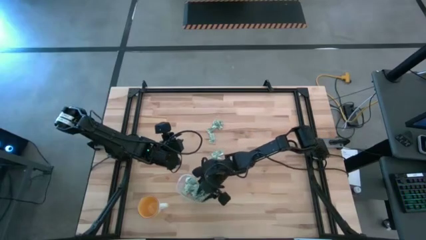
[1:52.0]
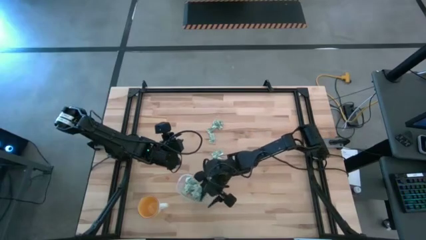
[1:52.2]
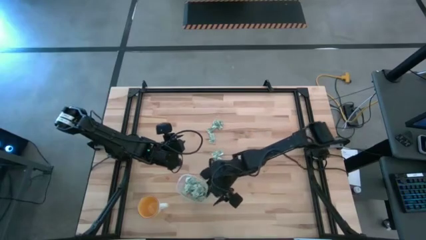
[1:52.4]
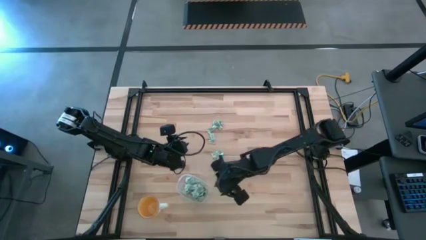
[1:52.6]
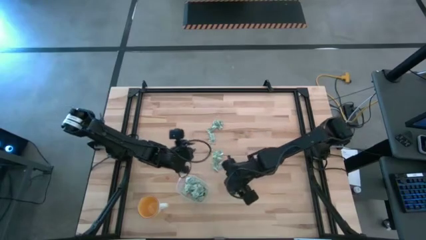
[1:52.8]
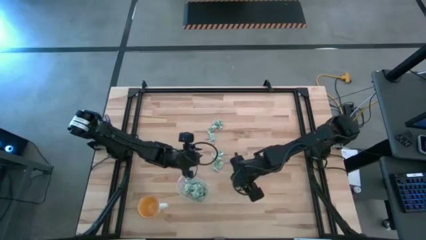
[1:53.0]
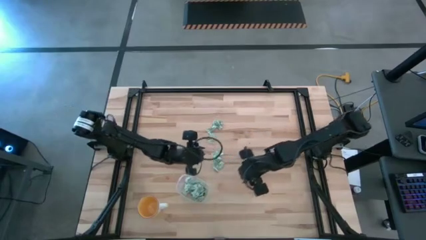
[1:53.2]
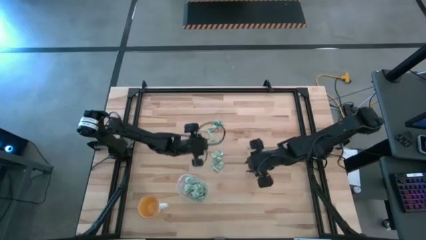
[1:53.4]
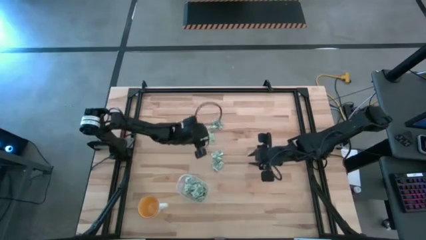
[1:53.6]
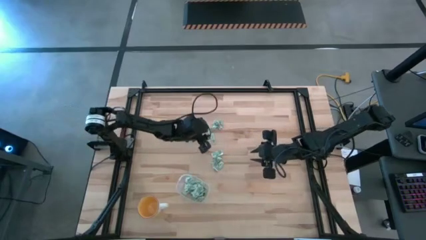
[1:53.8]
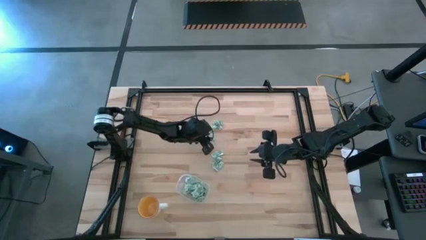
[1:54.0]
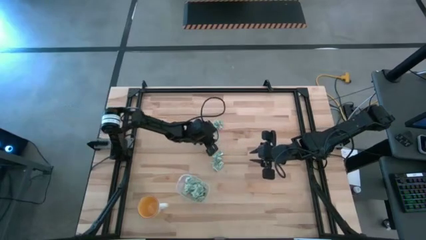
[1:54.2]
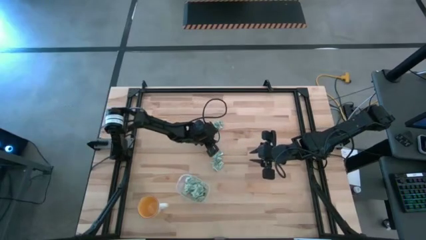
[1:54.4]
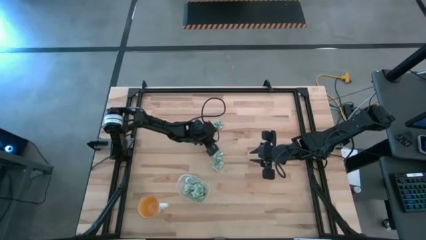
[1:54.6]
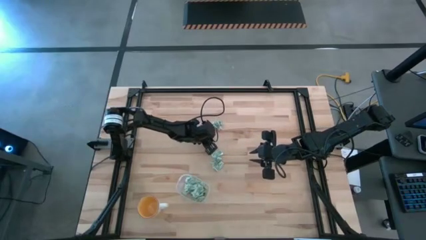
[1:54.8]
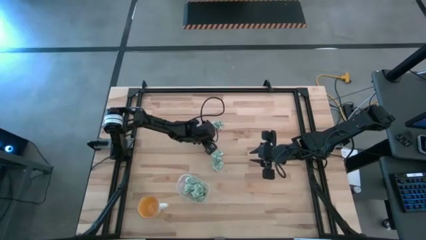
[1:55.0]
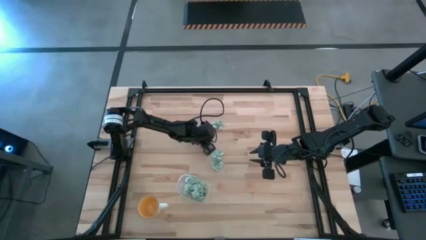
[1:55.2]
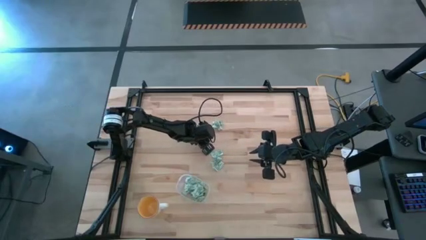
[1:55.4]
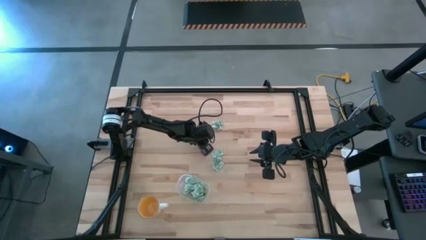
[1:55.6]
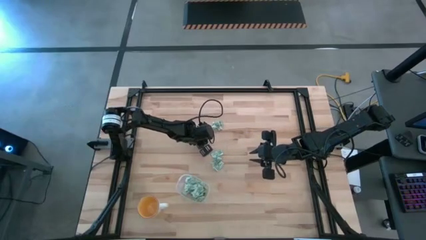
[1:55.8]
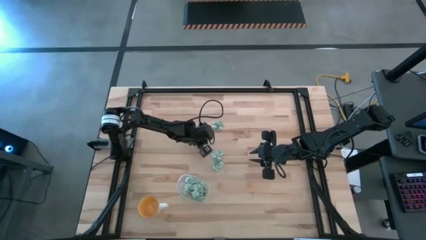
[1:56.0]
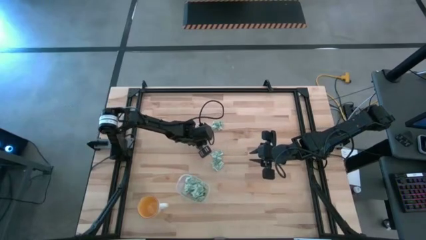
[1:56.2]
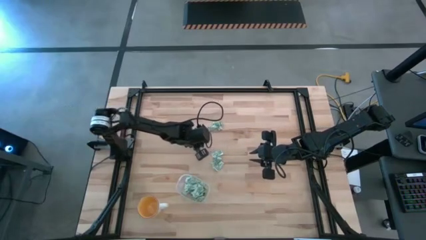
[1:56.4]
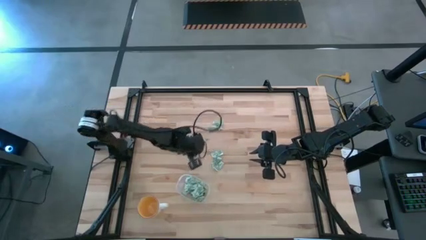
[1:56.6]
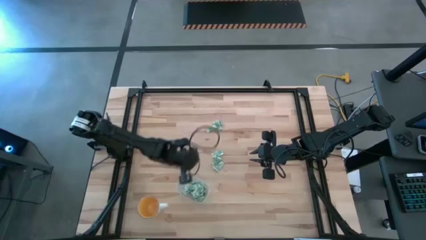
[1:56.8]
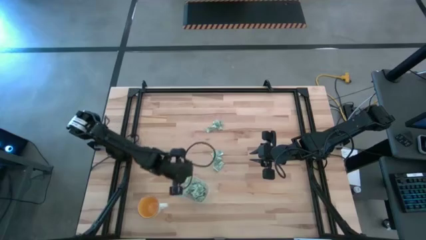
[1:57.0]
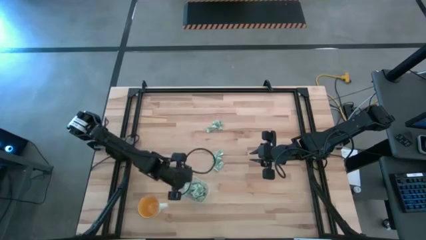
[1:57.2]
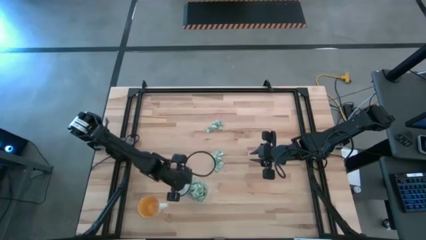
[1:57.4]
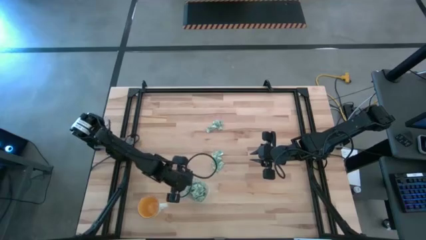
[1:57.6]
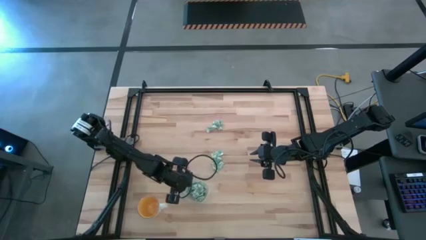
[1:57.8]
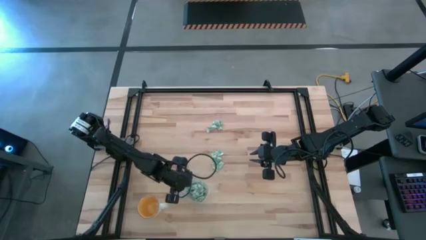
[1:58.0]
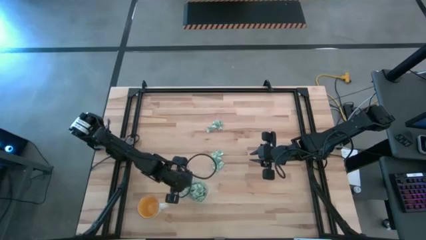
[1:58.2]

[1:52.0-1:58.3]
Task: Pick and place Stevia / Truvia into bins
Put the stevia packet into the transparent container

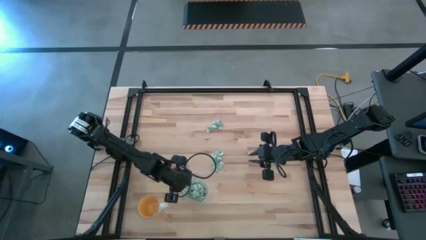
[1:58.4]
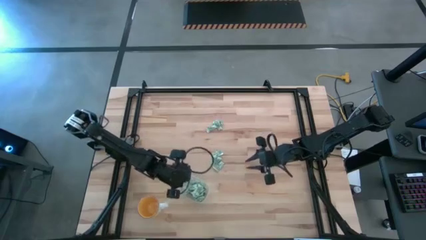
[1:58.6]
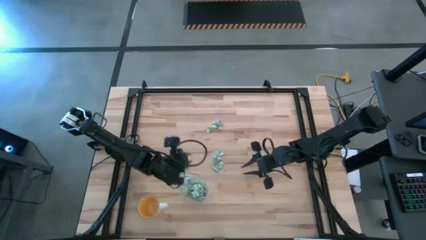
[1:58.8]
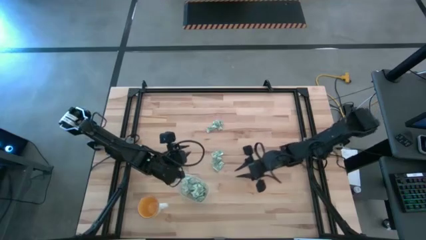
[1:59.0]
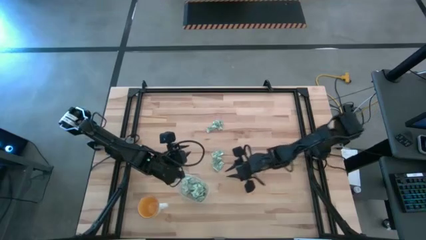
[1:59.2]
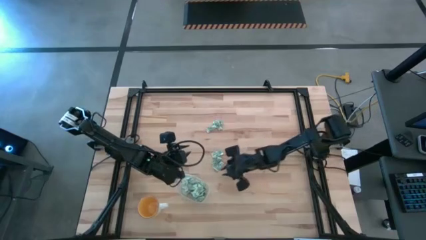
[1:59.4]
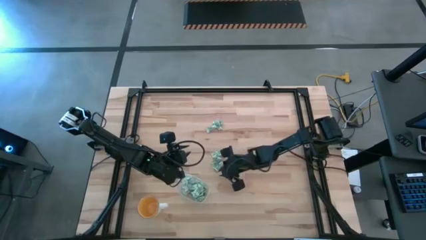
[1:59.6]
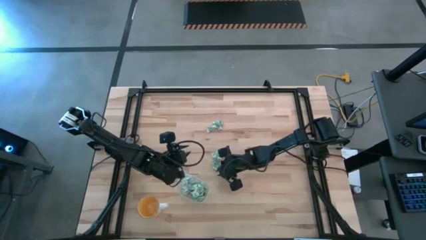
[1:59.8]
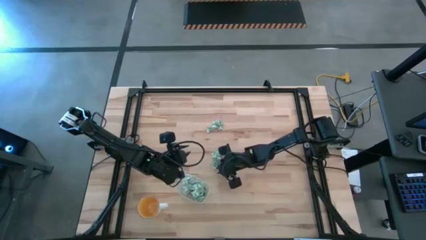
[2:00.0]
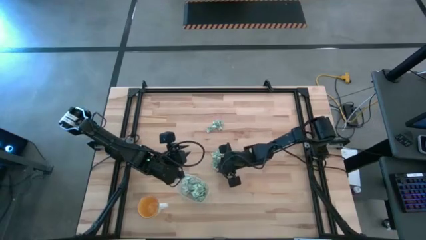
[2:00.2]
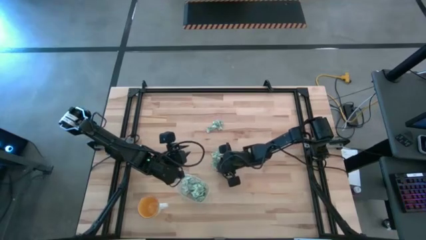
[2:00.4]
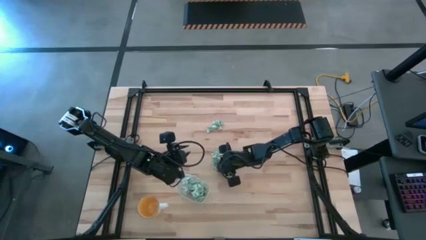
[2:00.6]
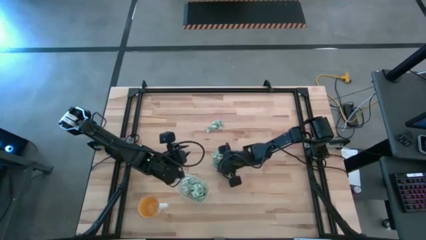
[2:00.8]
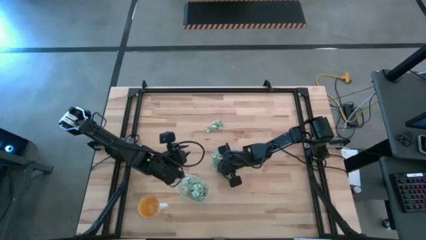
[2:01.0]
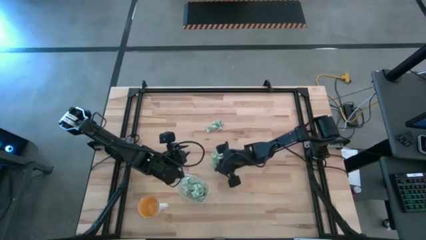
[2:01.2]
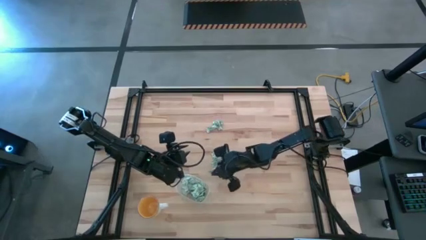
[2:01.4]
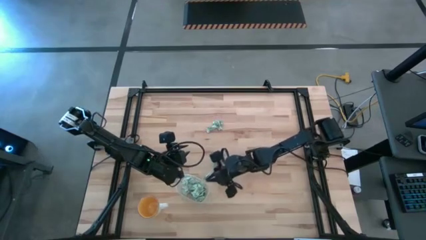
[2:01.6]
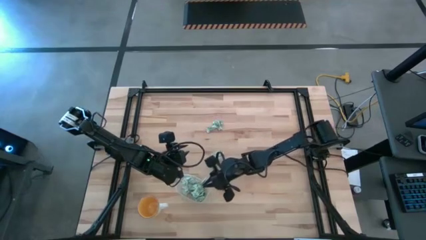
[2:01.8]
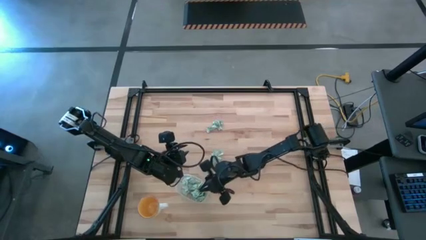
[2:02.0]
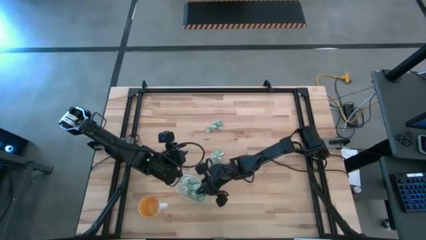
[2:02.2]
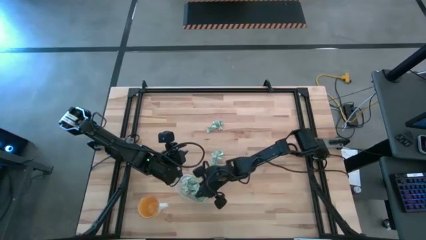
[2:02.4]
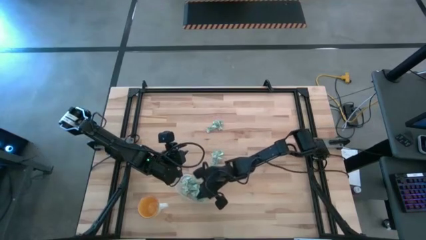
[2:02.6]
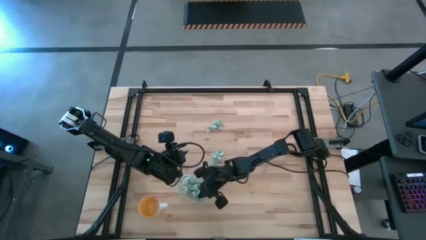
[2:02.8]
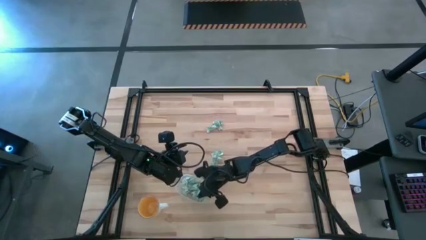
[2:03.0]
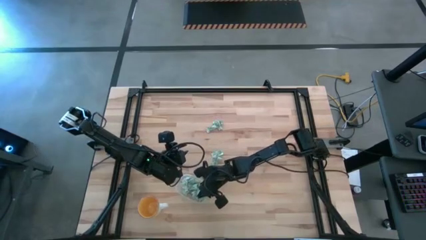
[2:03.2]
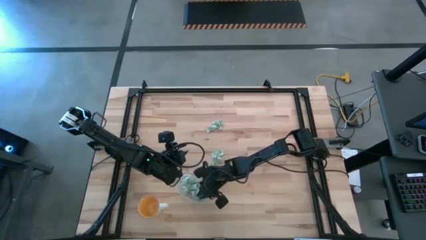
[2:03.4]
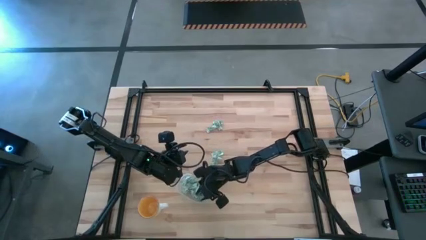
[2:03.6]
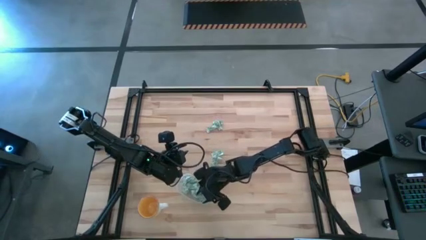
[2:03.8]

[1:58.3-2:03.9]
Put the stevia packet into the transparent container

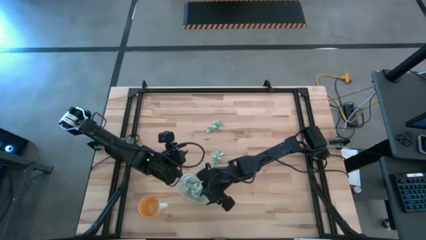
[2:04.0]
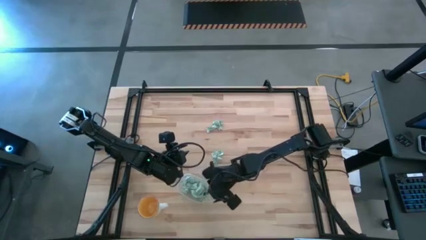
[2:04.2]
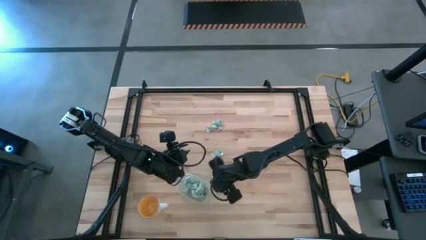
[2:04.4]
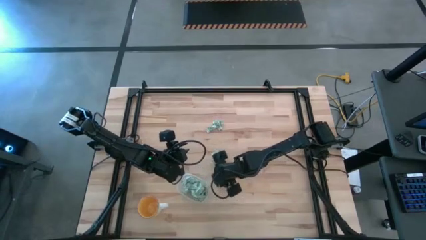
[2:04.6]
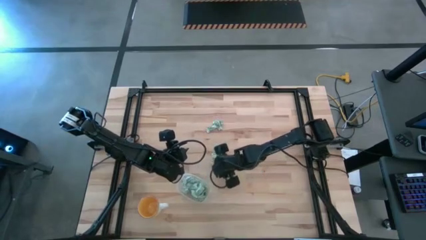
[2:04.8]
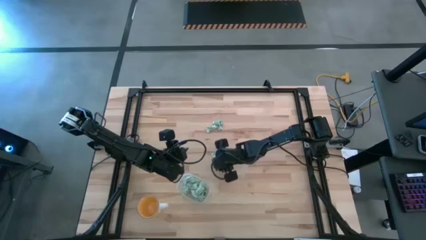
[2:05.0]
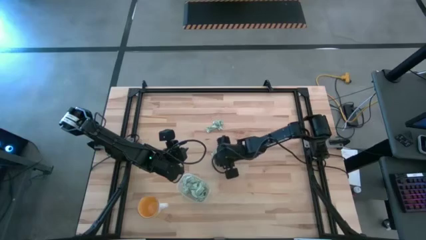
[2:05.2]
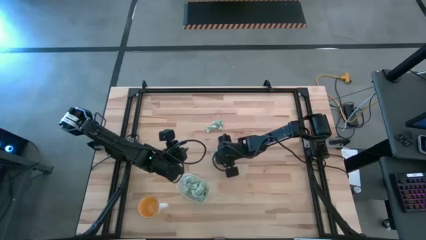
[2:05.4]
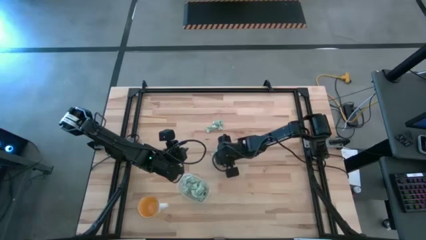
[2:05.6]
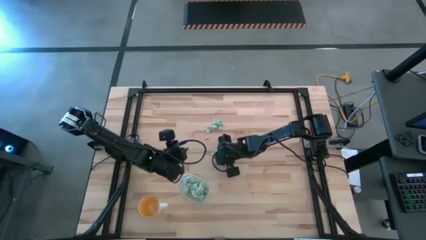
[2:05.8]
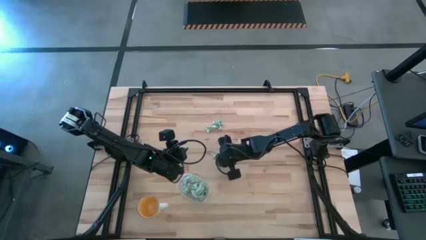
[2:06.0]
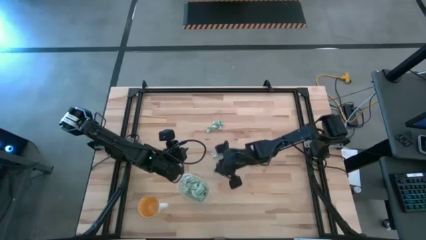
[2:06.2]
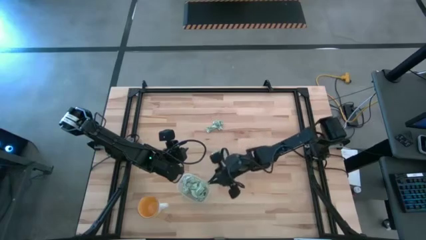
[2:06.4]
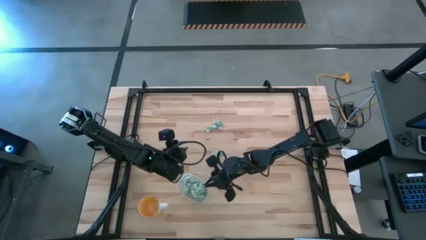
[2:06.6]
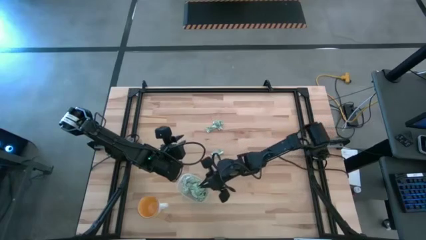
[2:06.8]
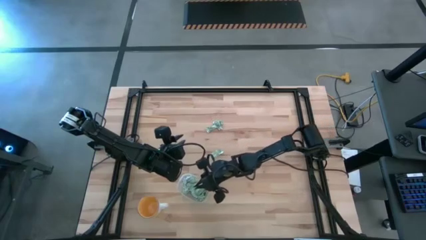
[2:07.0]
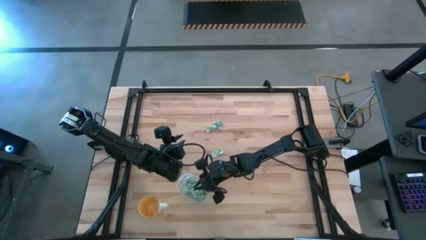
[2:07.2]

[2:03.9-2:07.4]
Put the stevia packet into the transparent container

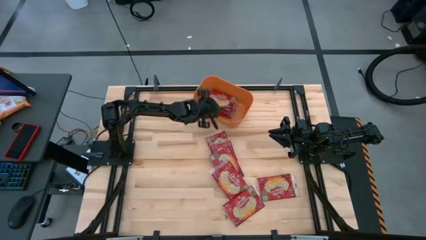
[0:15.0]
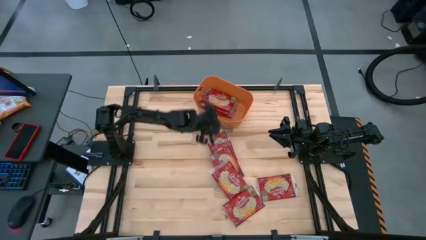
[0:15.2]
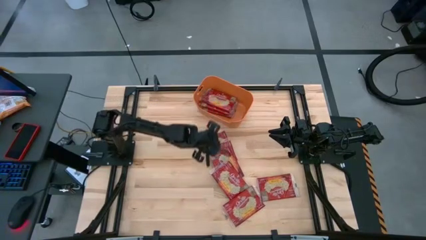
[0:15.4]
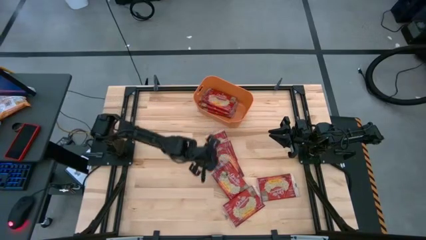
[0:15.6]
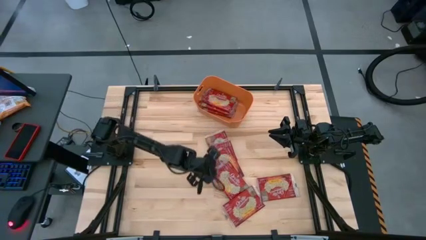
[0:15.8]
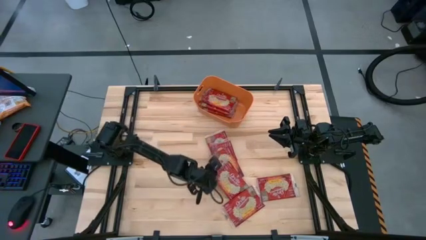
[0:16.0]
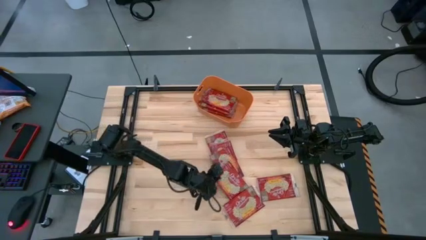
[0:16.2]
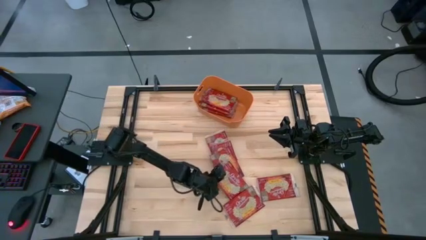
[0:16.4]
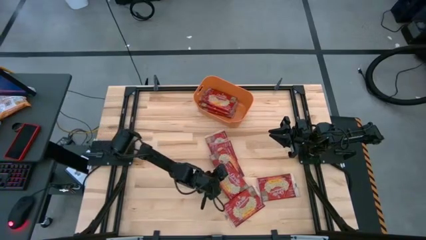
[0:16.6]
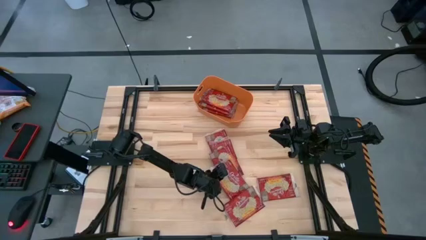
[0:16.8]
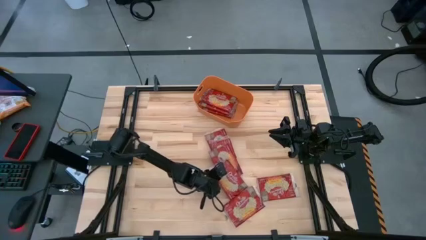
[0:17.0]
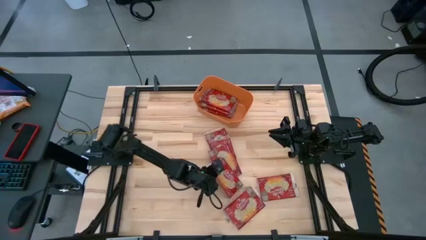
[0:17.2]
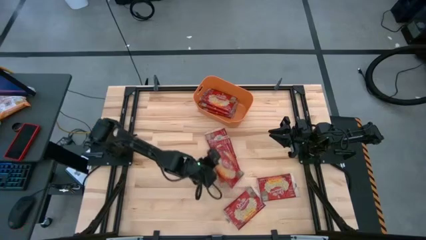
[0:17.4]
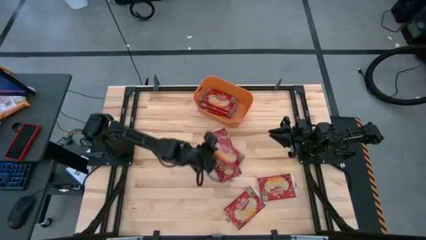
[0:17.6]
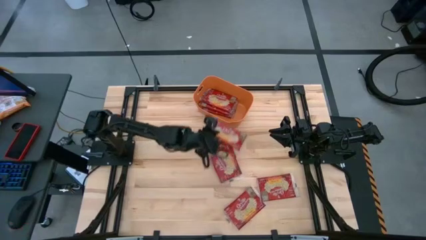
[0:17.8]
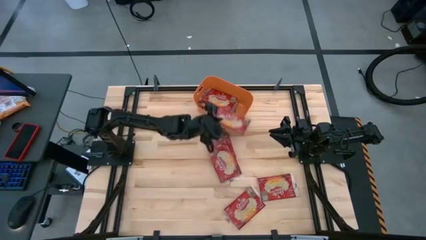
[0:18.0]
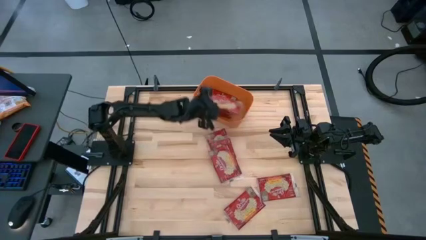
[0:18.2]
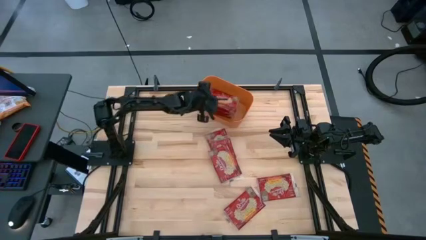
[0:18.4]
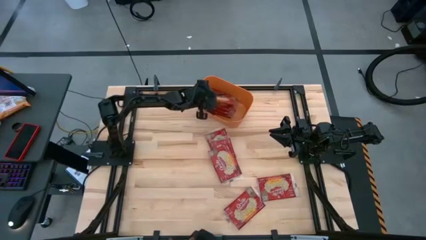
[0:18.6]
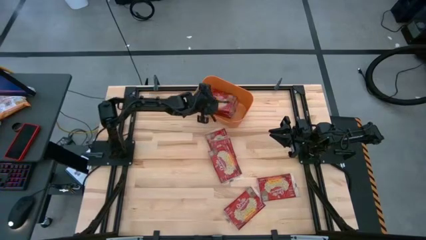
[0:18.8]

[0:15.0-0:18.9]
Task: Sort popcorn bags into baskets
Put the red popcorn pack into the orange bin
